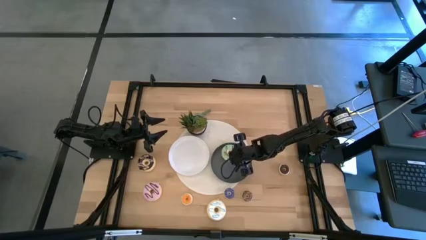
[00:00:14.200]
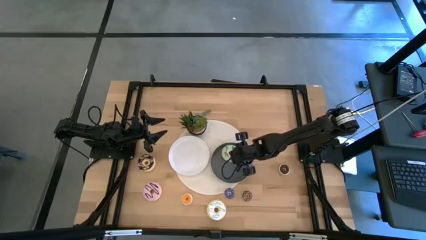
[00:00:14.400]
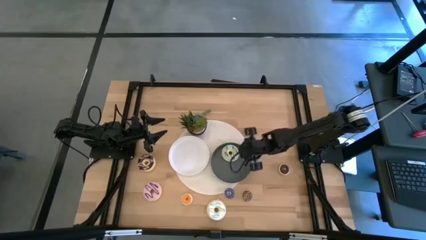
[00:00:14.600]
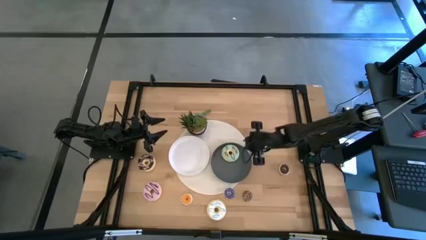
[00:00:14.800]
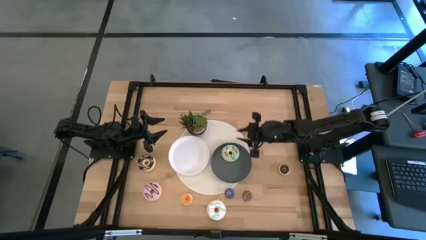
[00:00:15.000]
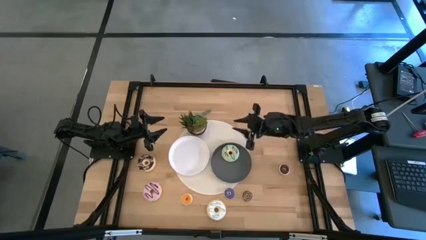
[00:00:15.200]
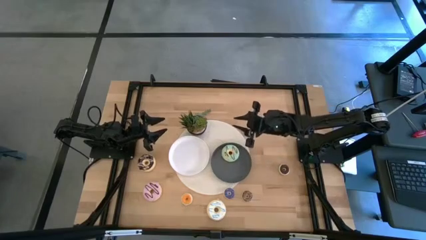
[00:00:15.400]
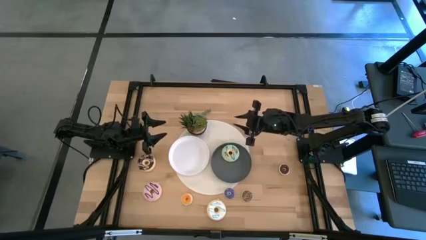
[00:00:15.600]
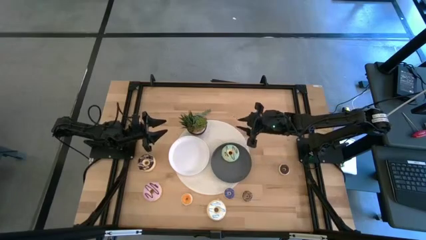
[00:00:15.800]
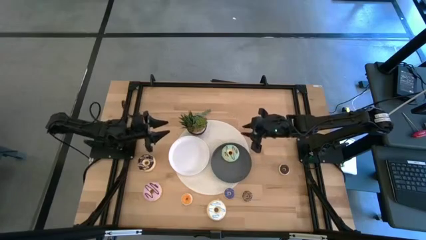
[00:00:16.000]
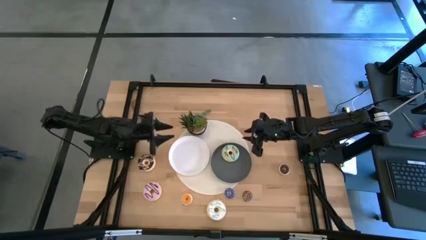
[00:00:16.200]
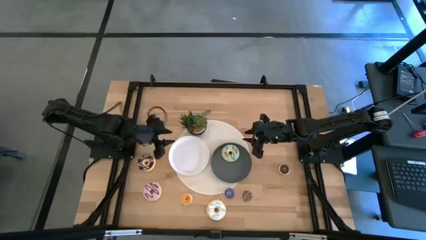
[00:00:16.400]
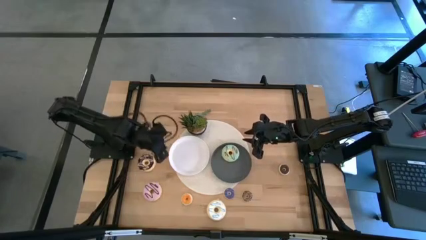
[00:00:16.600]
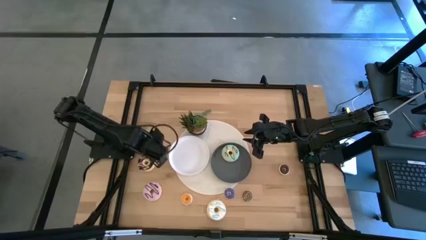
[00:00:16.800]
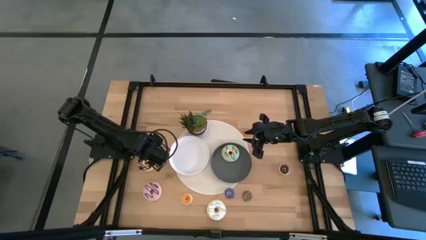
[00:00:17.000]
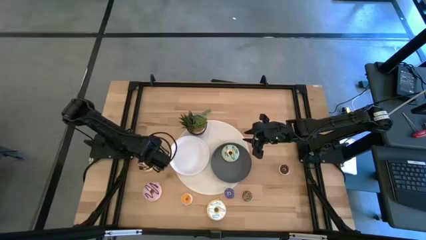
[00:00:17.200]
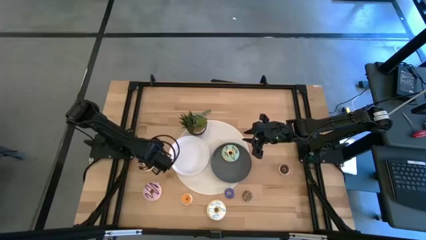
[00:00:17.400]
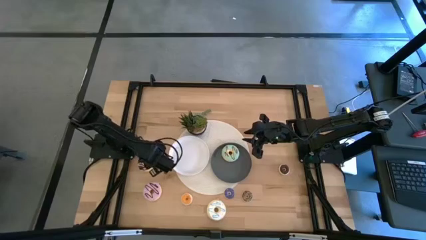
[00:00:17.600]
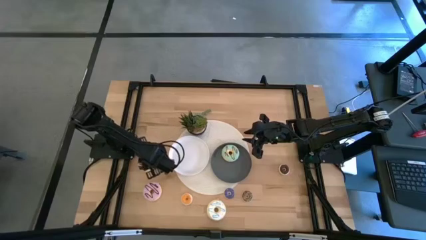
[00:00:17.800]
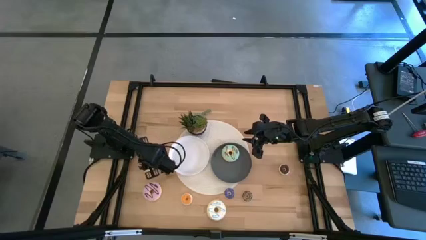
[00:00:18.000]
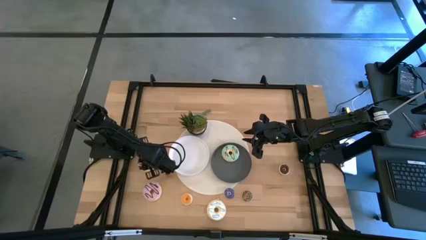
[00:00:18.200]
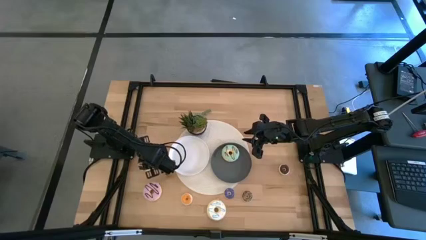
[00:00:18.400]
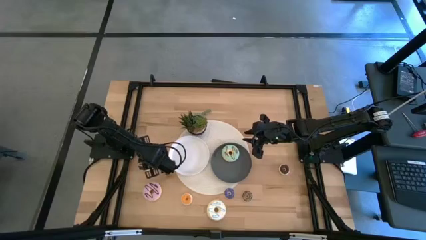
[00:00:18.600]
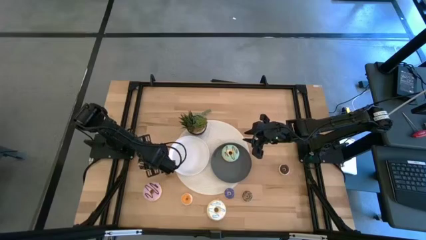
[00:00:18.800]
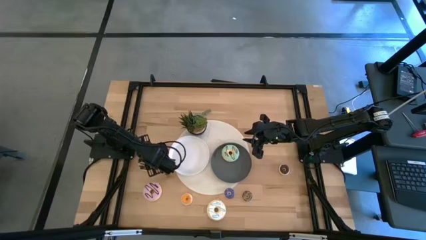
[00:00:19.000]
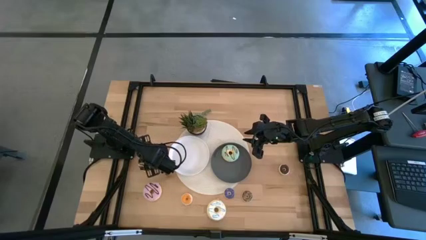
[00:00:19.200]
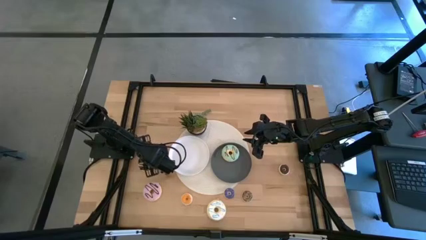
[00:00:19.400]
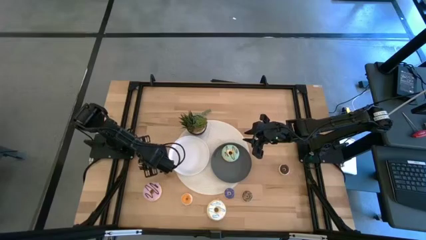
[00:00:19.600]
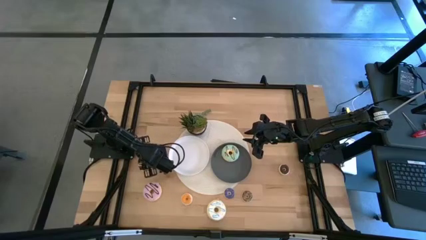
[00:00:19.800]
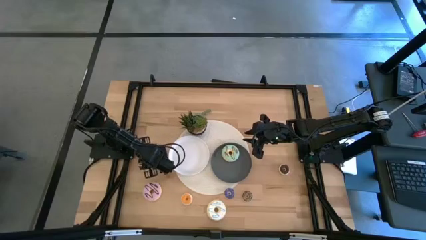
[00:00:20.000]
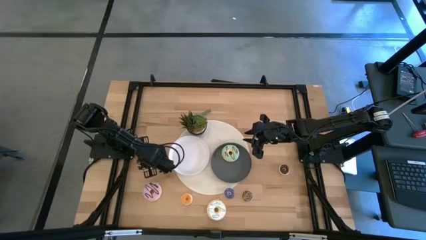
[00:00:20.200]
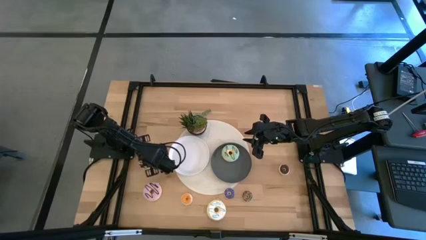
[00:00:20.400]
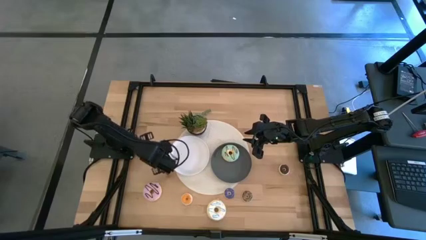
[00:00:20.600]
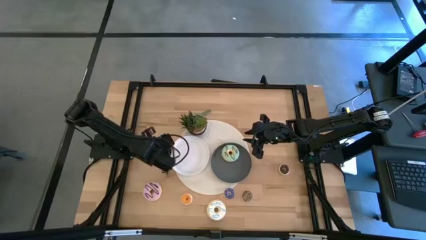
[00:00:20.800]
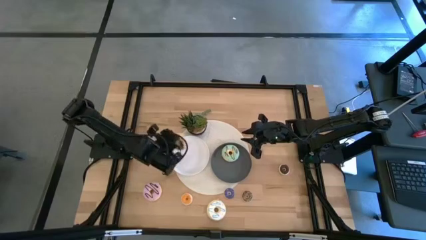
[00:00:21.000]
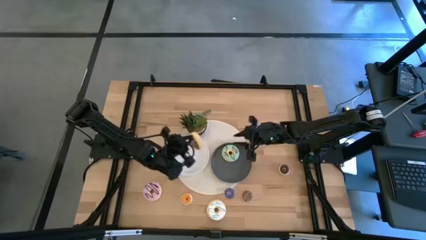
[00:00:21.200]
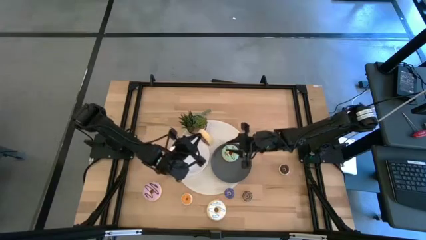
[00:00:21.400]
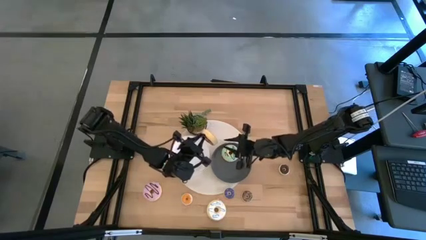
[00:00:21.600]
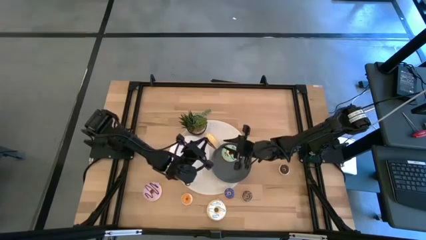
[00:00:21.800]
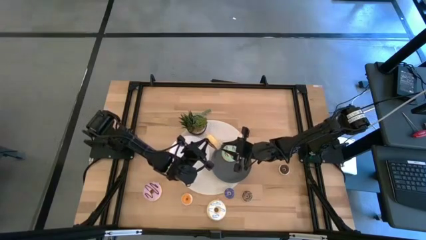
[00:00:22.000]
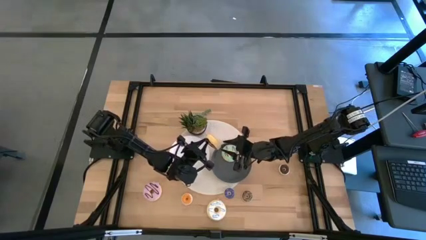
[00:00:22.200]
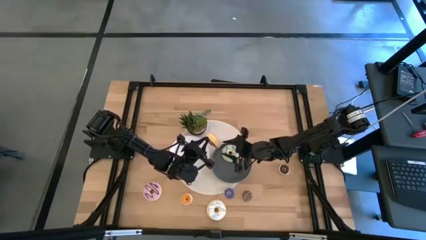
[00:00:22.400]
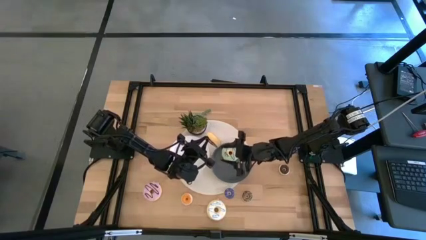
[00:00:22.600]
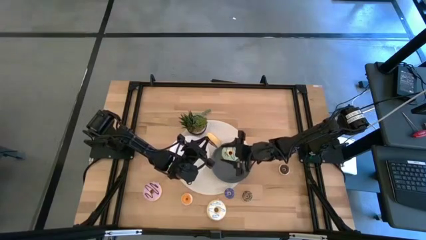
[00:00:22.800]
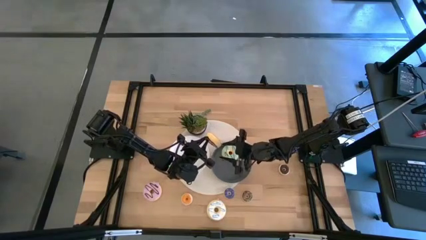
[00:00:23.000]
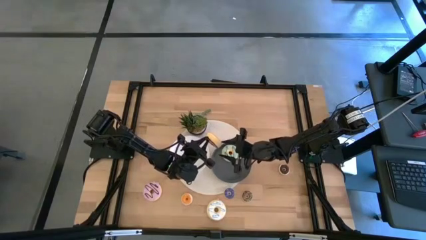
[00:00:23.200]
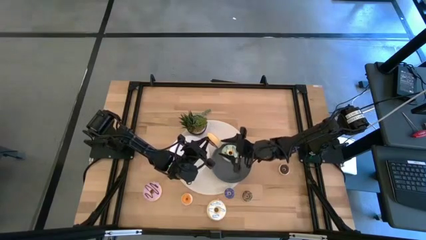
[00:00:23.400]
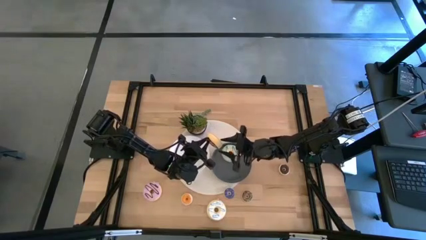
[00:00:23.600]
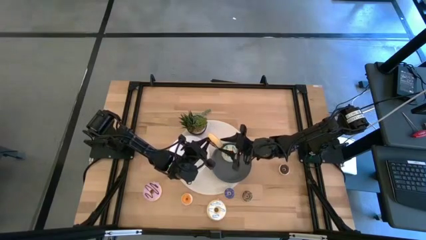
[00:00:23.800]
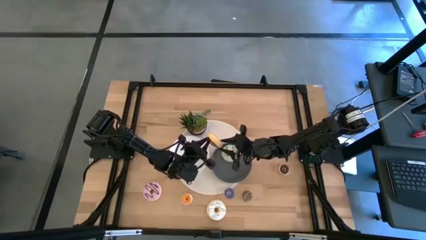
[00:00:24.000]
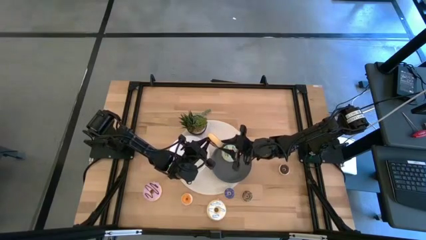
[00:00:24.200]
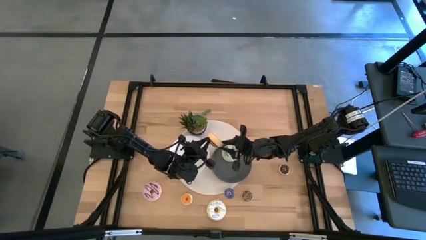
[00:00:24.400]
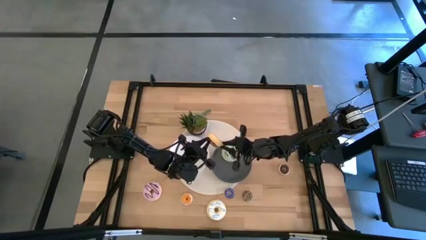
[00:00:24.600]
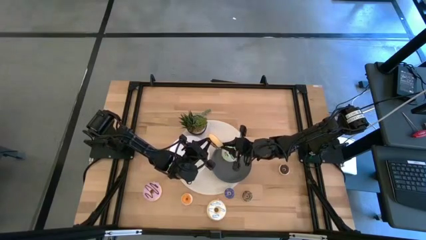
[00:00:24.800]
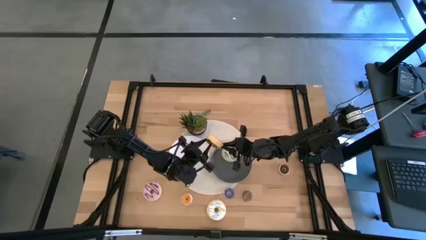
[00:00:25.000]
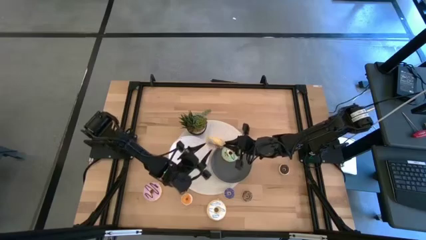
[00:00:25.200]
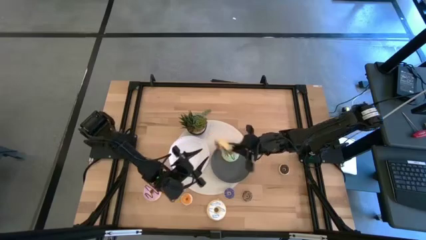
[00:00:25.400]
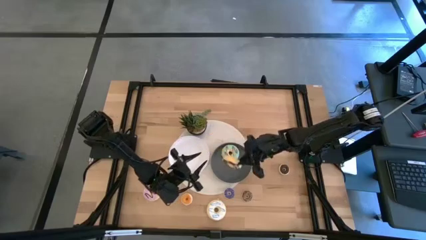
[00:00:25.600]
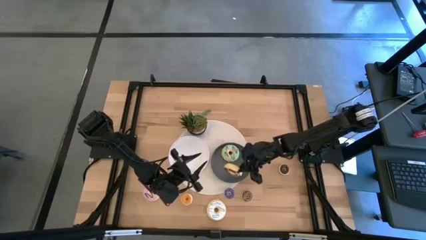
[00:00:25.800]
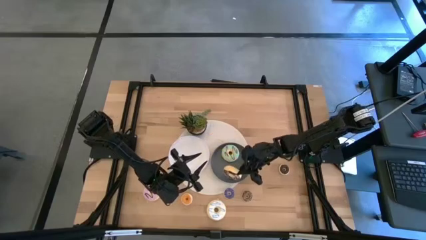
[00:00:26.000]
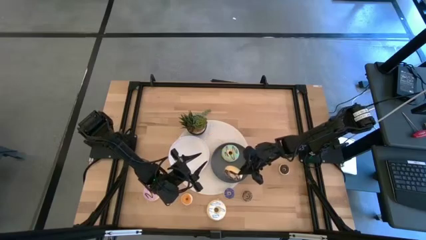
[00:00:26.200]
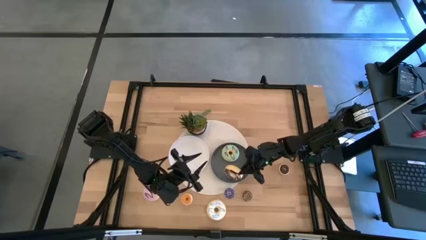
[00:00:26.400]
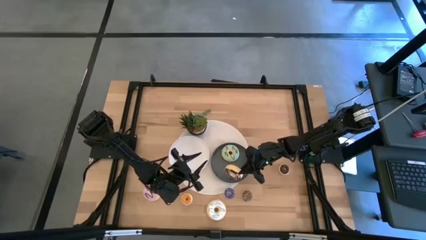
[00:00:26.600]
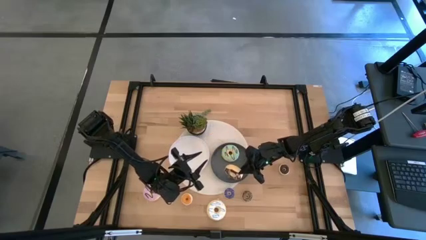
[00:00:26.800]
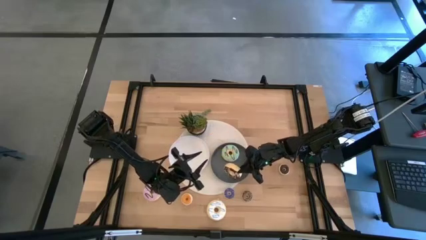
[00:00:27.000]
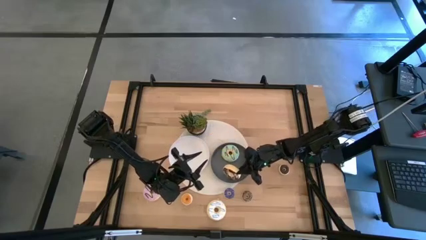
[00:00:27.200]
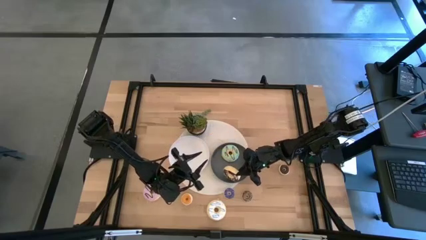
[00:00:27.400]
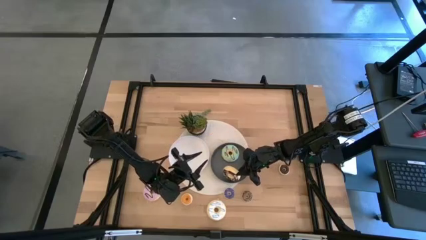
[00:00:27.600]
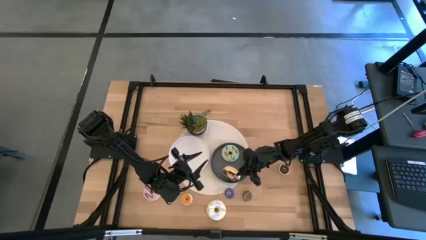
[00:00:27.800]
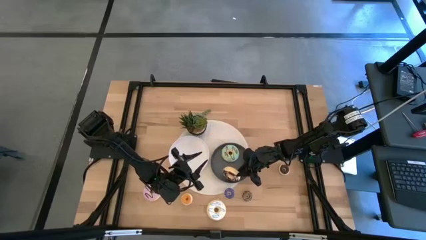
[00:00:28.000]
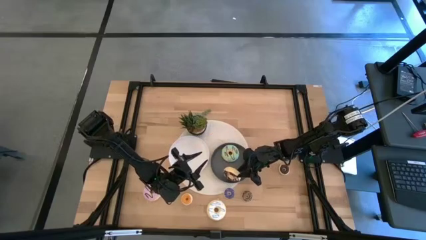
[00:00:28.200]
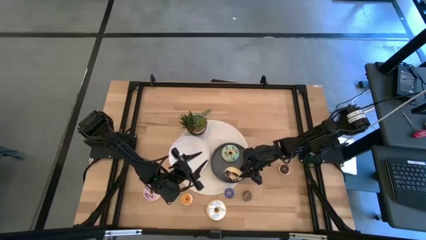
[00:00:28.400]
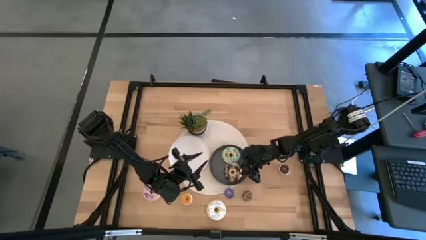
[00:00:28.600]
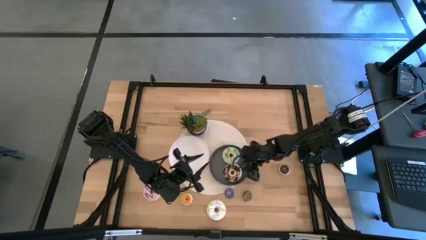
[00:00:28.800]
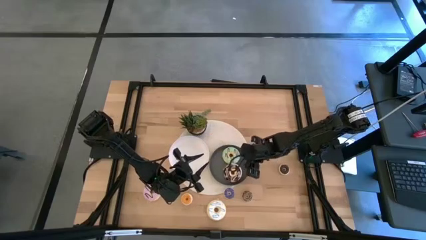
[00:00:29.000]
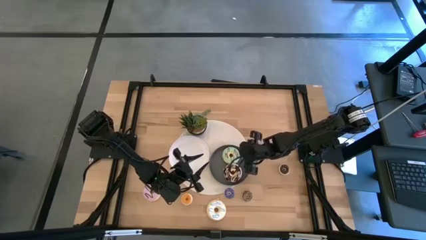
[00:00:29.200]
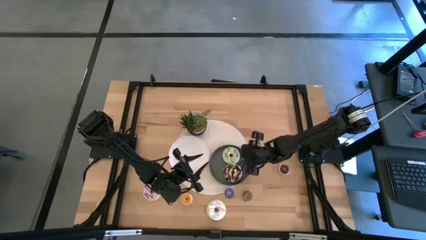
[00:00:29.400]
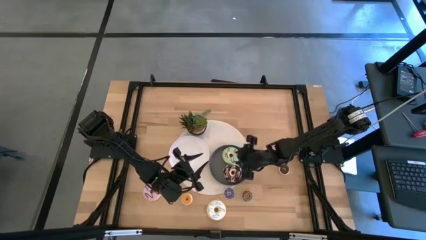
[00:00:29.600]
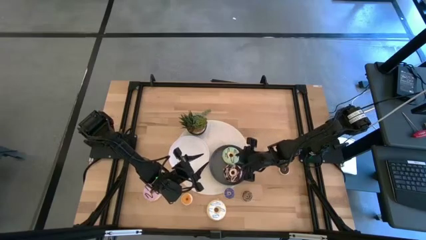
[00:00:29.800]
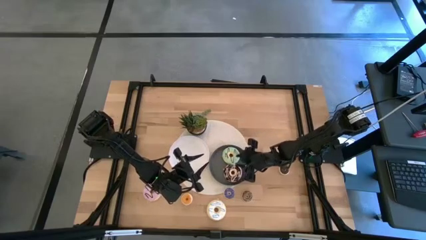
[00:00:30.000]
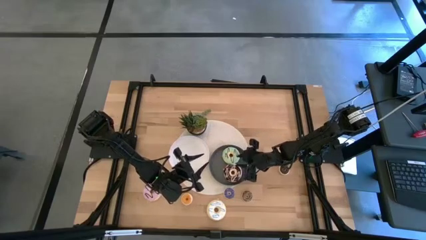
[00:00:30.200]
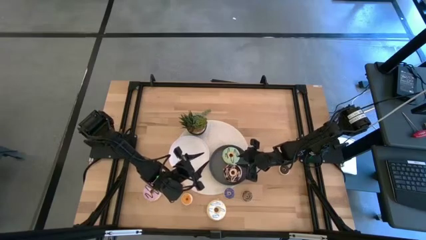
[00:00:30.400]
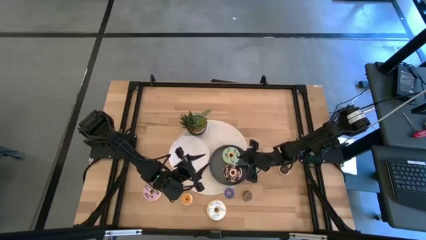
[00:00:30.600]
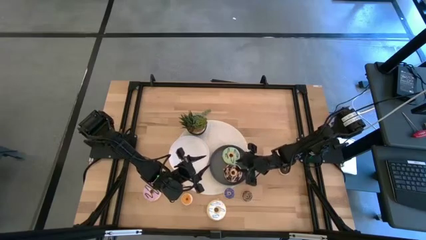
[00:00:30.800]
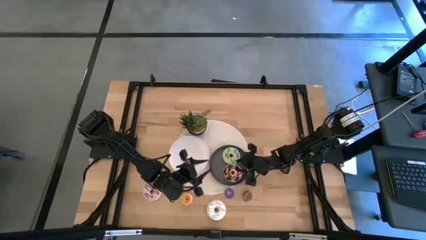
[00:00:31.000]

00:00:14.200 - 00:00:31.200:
Task: Pick & Place donuts
Put the large black donut on the gray plate
